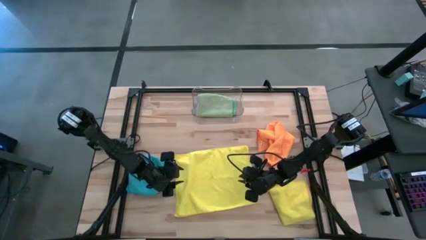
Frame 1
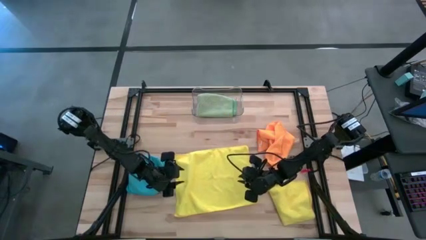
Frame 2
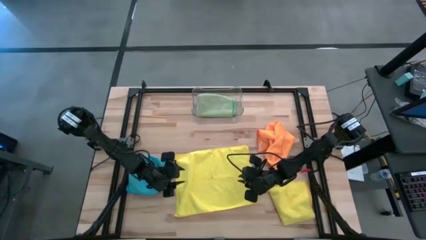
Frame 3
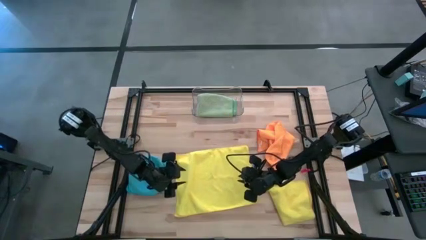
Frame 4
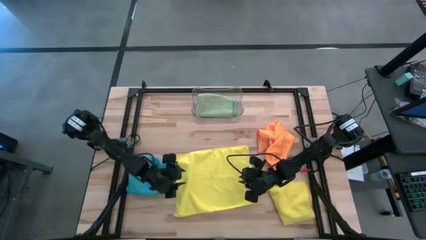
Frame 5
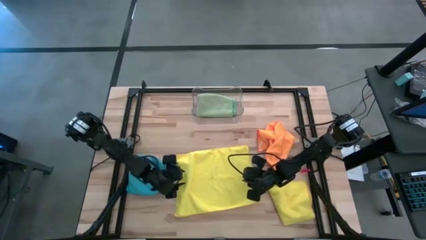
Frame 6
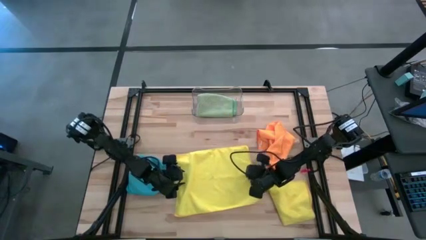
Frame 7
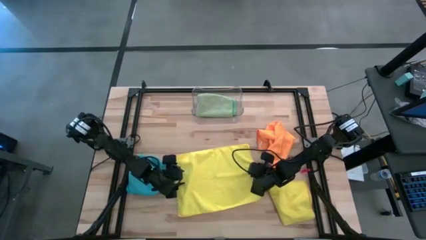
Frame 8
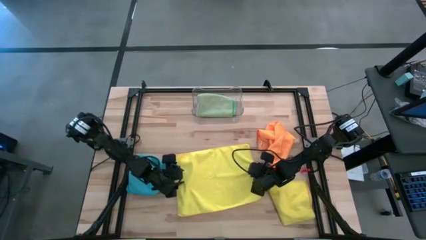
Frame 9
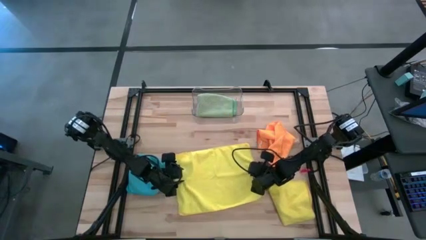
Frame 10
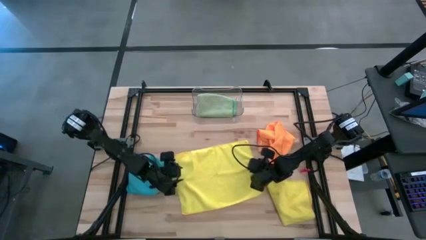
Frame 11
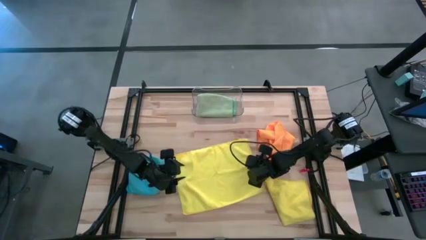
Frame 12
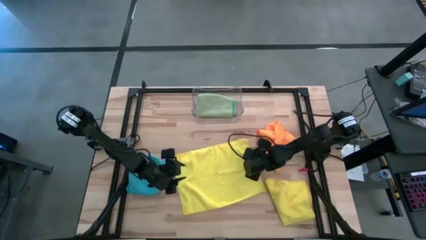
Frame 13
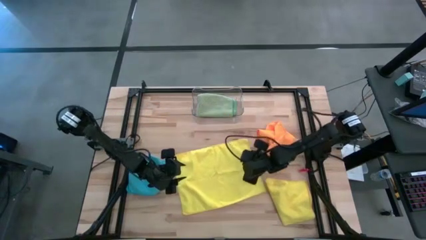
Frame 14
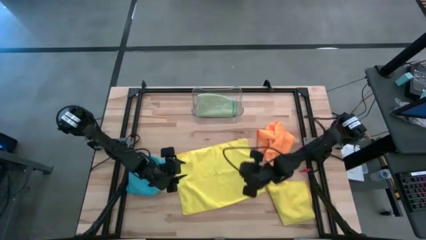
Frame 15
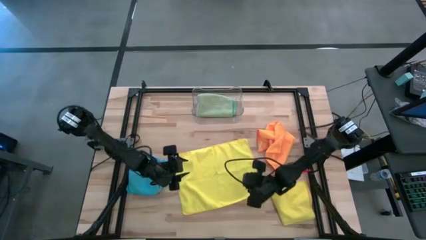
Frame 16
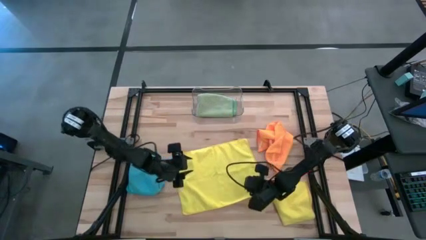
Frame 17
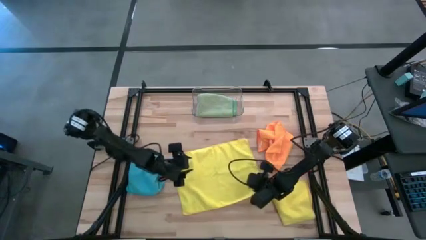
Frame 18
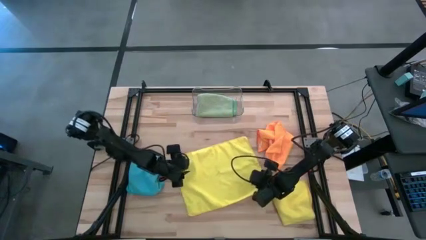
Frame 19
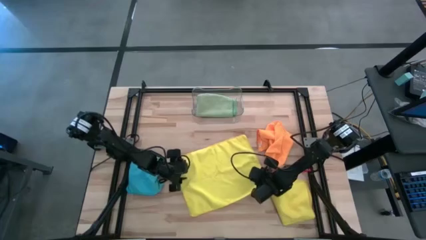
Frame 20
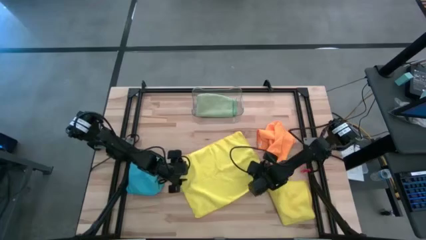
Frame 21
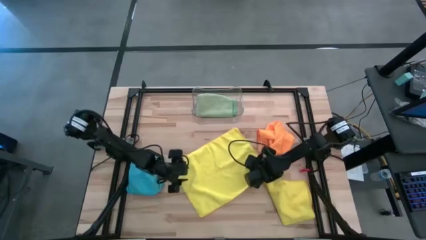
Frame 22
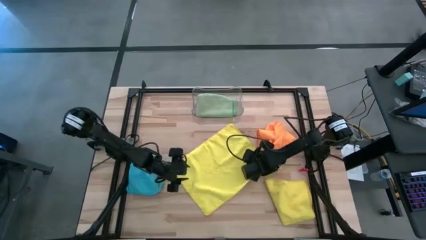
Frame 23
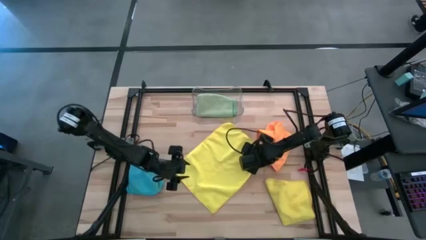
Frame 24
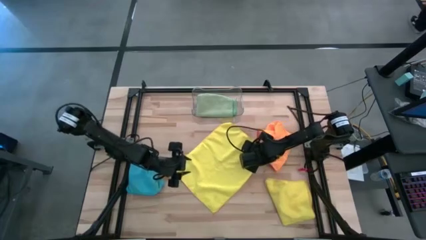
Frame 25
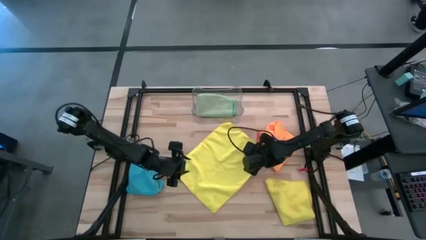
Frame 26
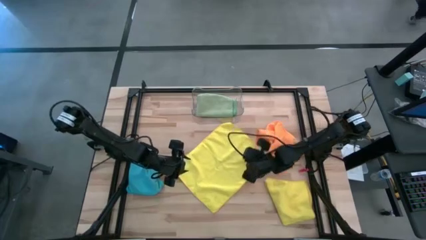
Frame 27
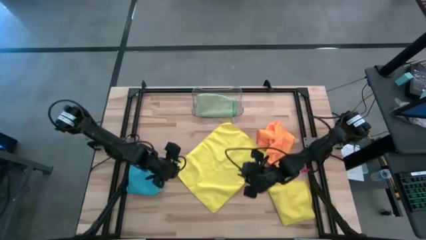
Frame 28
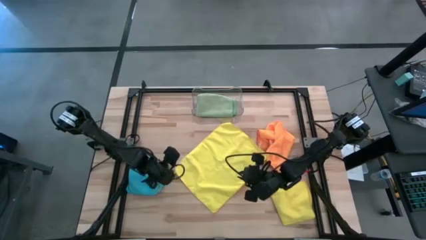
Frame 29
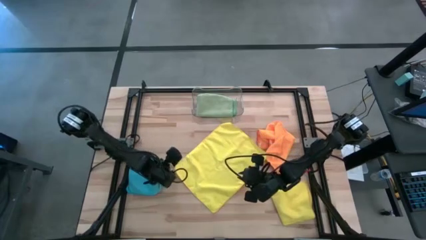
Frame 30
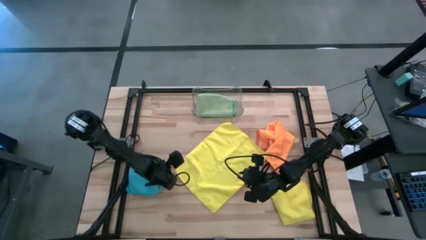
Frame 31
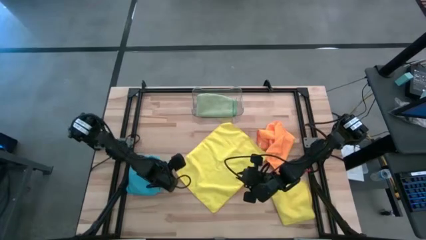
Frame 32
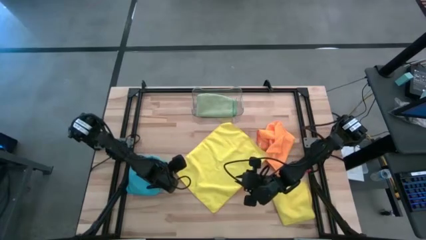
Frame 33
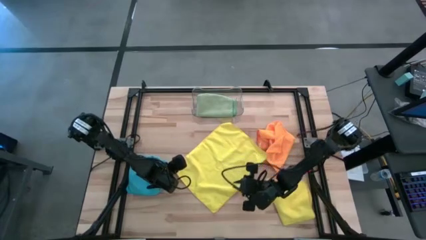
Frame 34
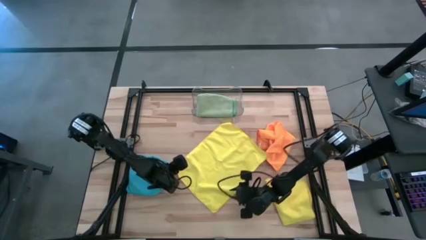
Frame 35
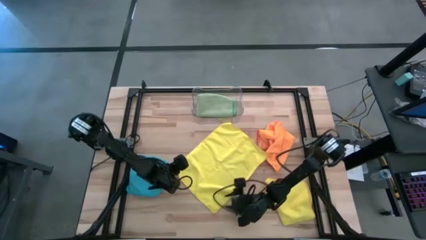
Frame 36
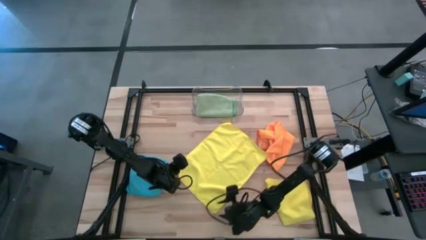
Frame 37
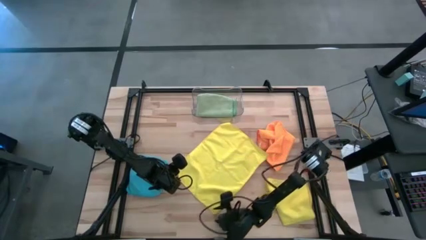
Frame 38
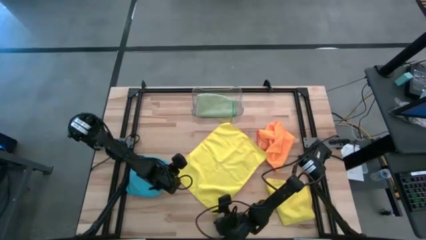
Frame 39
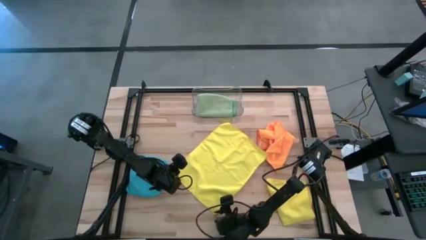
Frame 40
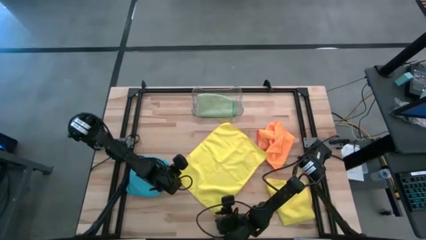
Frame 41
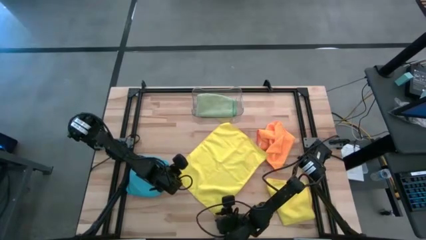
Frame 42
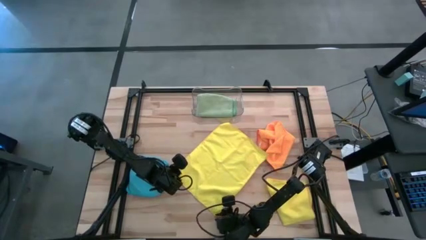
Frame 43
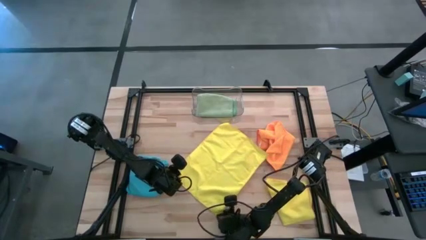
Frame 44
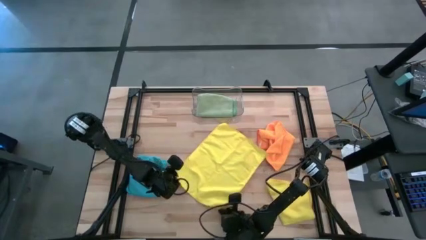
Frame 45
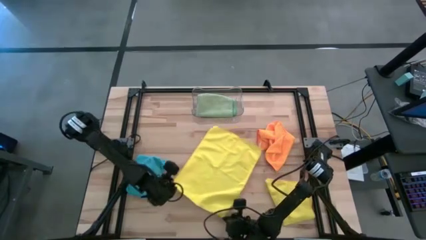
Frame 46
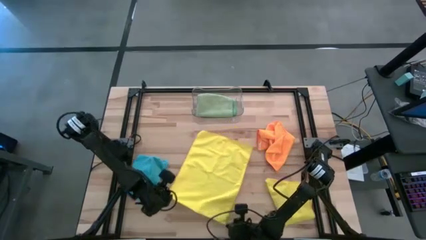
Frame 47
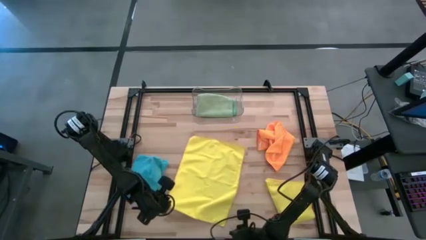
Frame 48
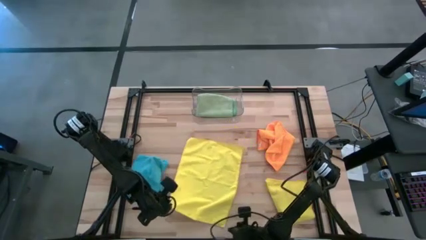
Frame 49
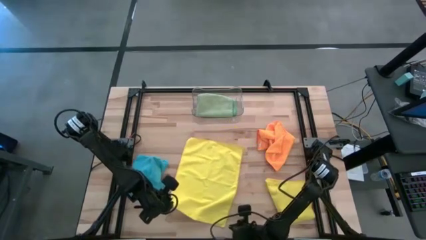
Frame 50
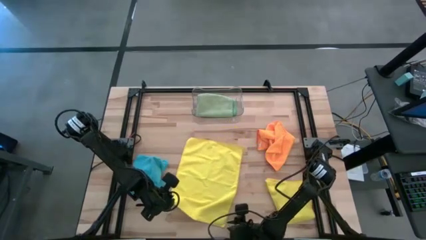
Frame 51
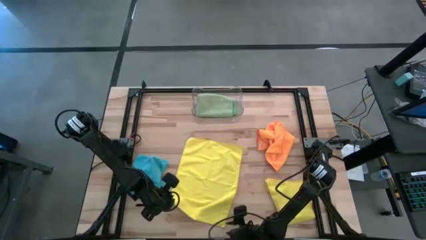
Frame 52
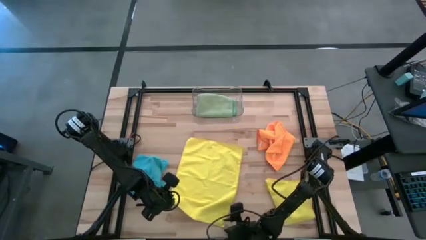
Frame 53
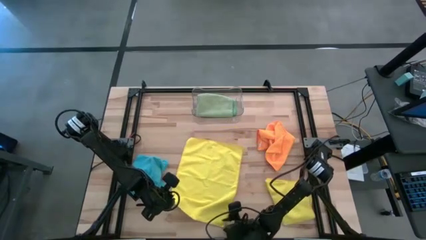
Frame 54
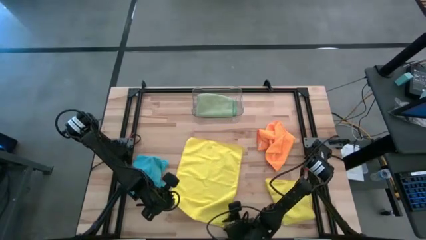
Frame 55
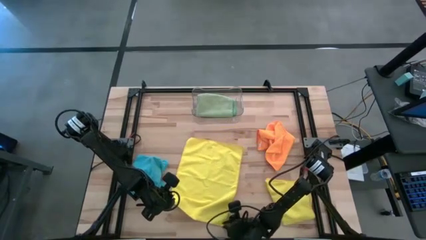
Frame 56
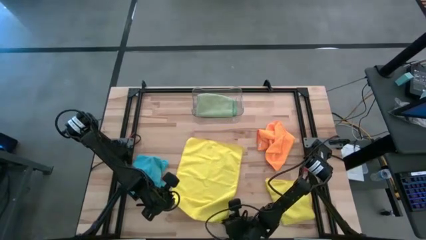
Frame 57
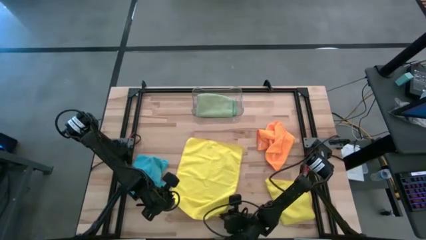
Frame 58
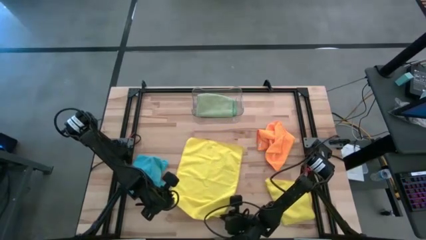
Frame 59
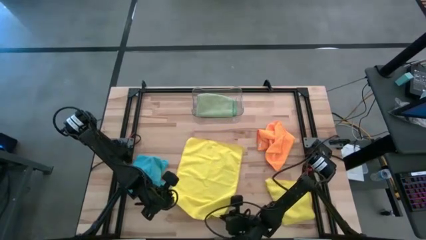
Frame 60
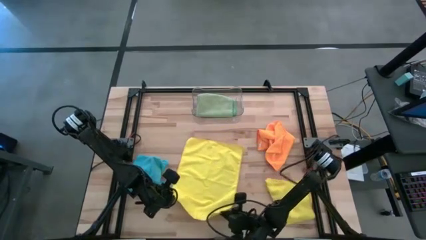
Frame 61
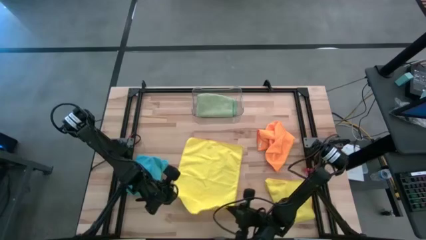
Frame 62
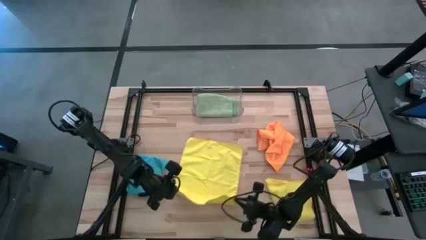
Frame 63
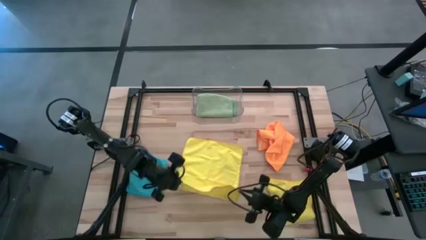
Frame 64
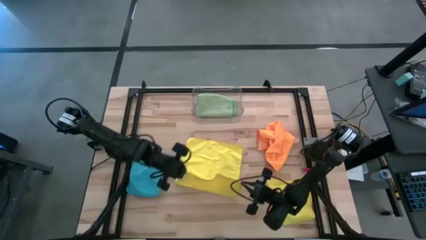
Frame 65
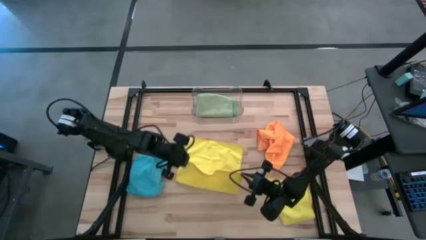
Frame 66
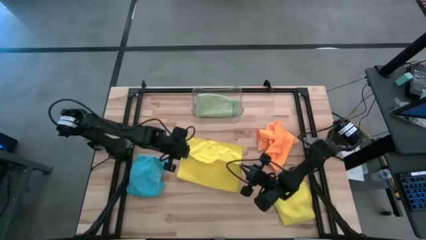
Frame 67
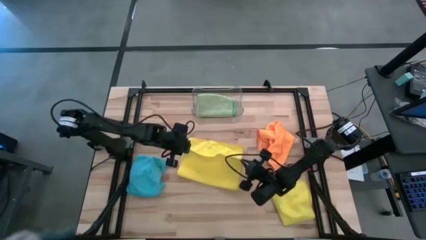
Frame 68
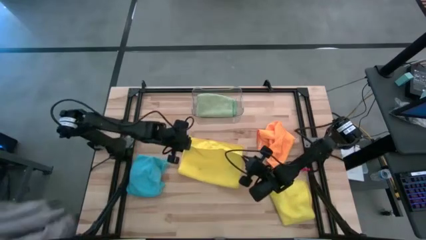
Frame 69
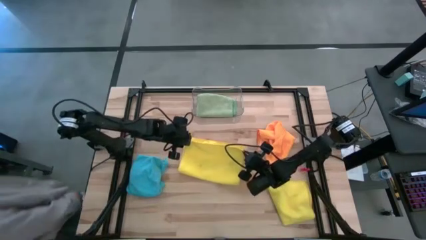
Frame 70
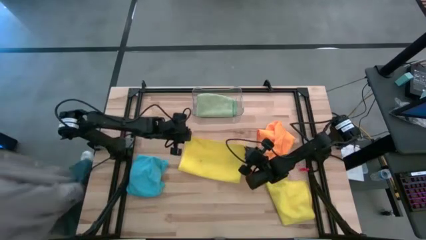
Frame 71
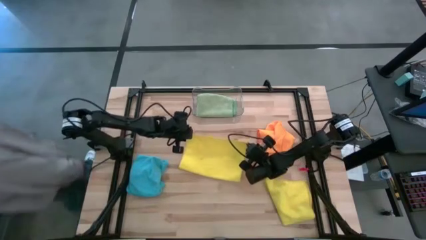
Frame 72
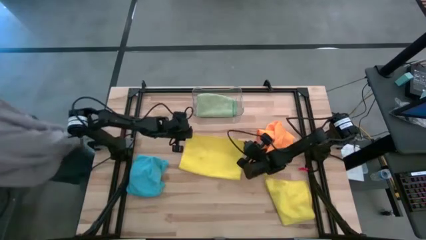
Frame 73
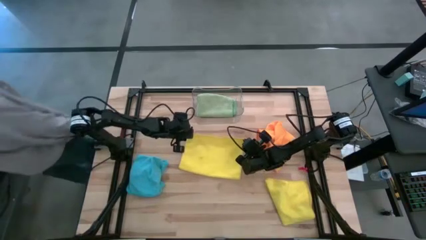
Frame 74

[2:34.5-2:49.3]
Task: Fold microfiber towels
Fold the top yellow microfiber cloth
